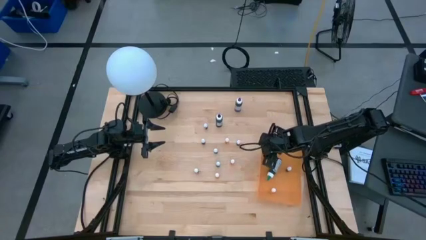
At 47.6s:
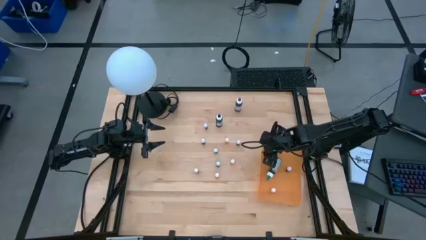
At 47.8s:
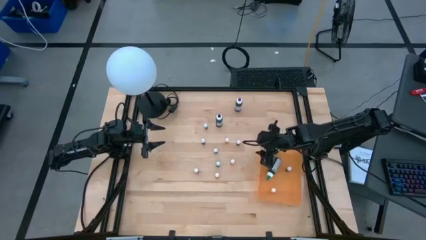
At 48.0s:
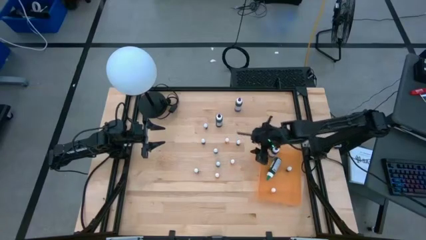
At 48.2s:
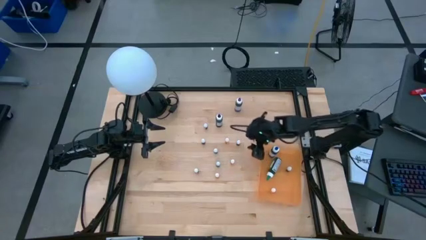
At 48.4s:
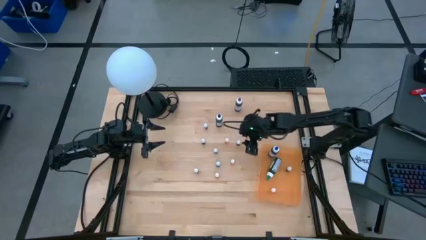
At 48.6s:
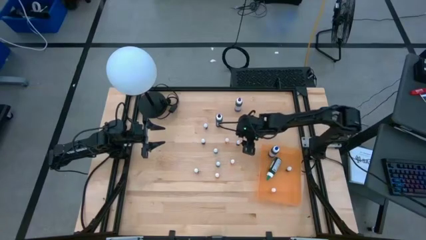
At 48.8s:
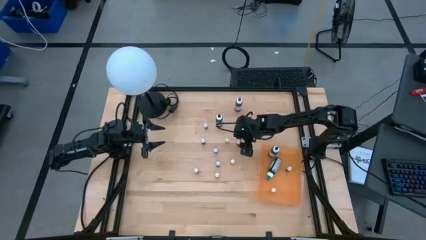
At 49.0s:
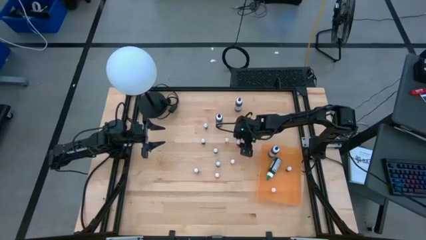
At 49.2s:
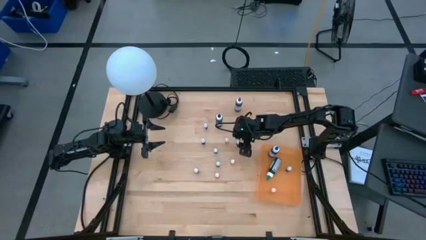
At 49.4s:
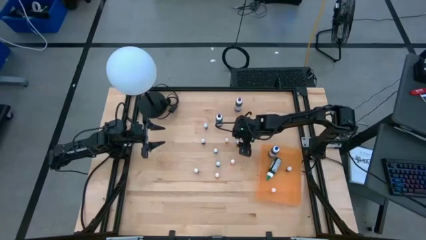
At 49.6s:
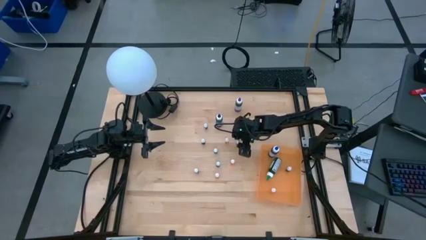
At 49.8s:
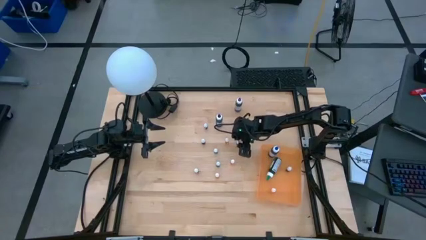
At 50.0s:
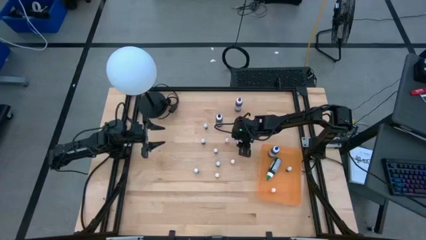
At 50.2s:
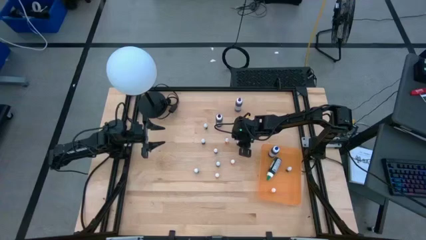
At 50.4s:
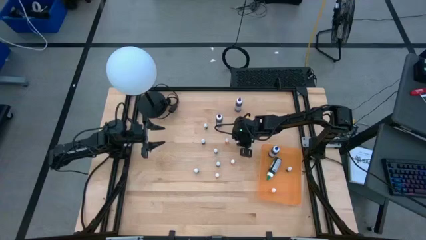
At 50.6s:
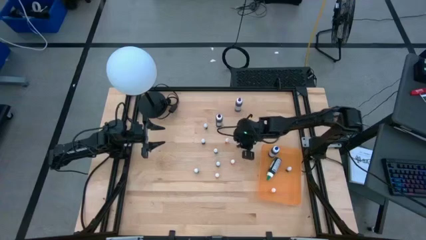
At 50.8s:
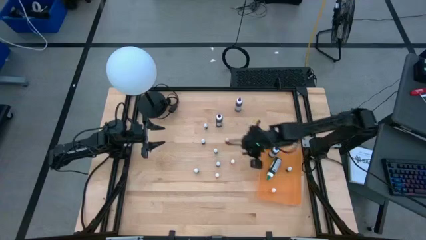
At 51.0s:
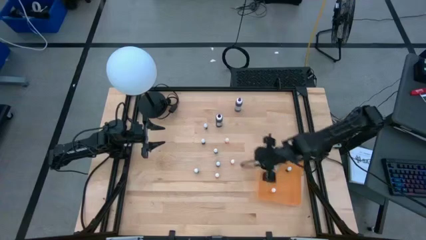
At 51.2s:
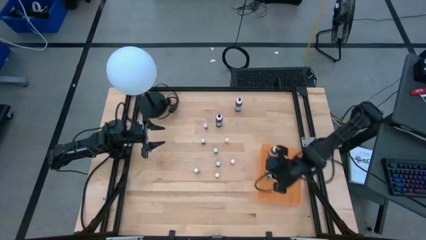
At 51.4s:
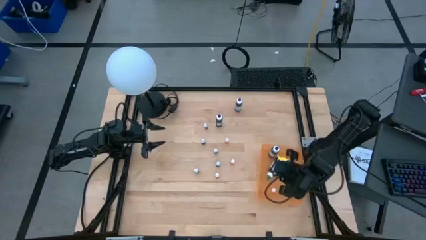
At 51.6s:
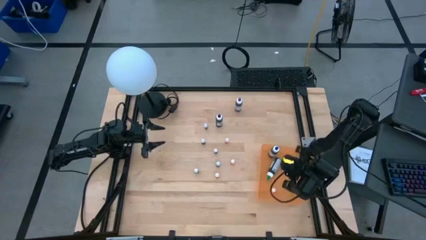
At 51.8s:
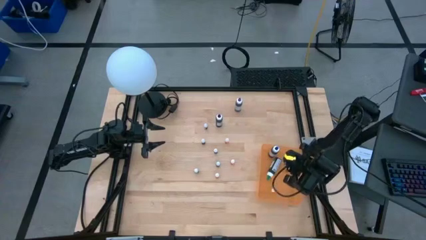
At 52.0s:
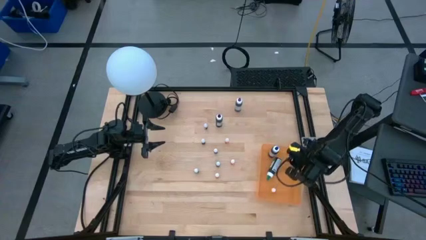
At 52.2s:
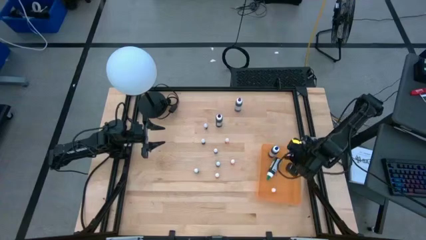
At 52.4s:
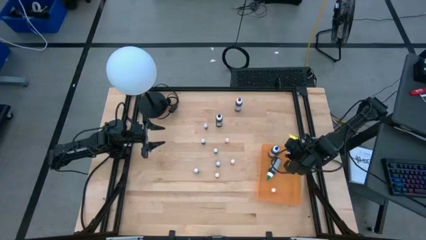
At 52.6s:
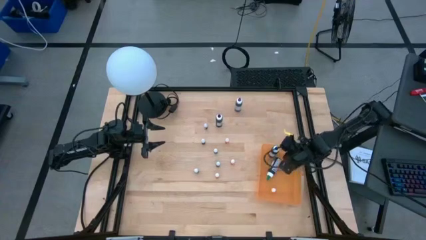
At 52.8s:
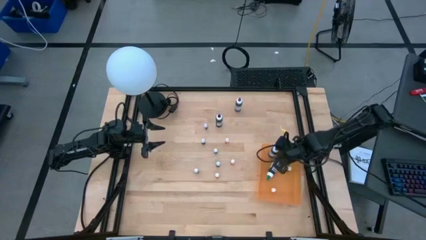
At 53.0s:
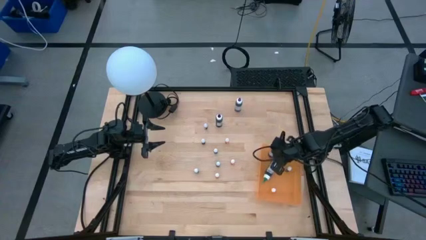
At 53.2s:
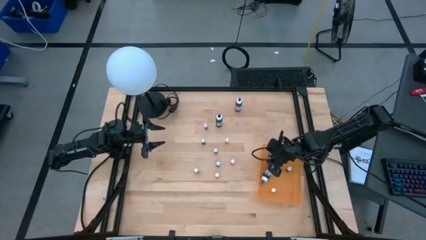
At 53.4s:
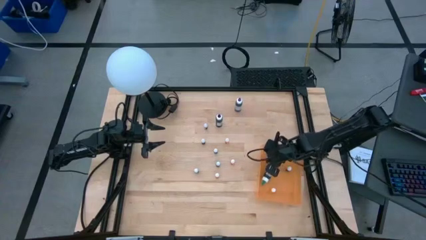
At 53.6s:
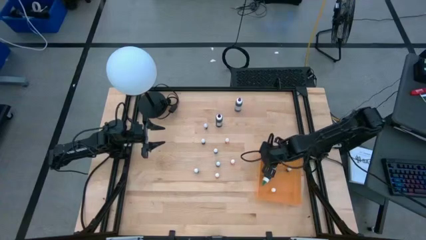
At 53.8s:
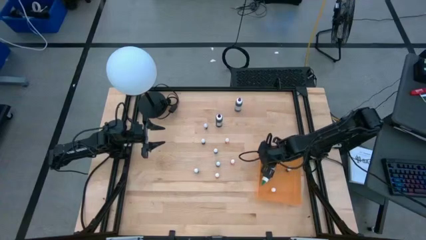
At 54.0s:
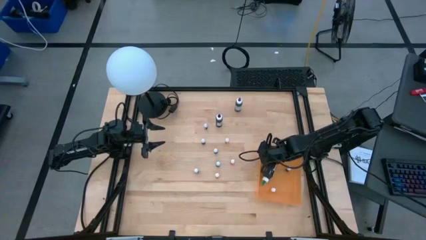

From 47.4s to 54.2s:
Task: Pick & Place food coloring
Put the small red food coloring bottle into the orange bin

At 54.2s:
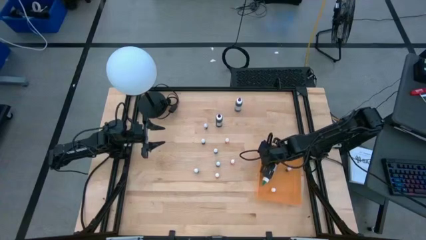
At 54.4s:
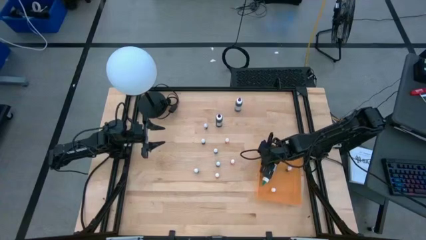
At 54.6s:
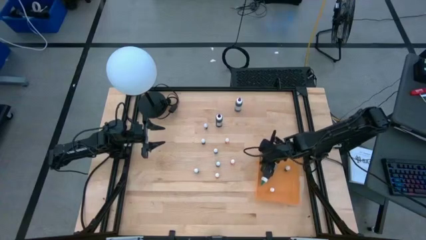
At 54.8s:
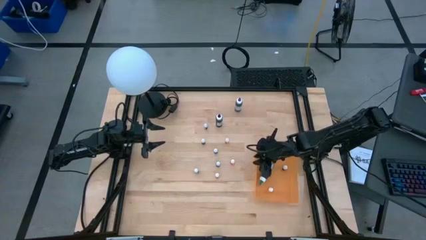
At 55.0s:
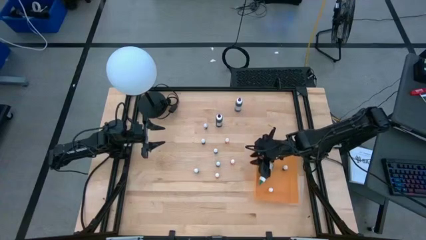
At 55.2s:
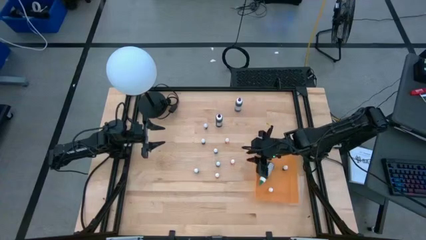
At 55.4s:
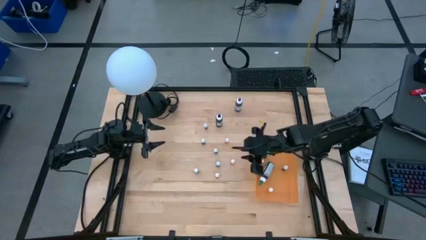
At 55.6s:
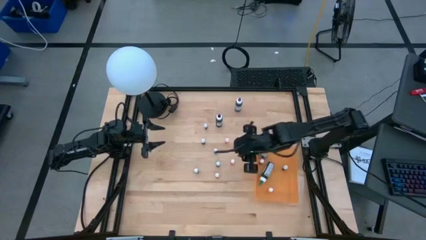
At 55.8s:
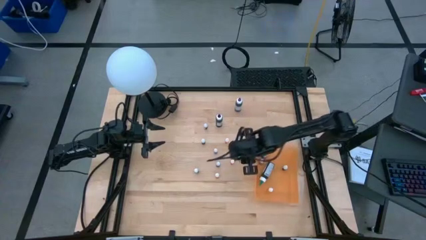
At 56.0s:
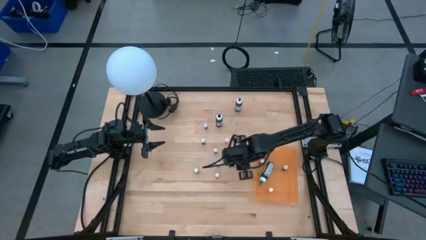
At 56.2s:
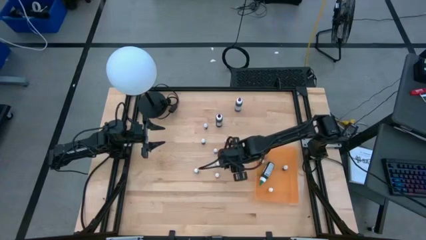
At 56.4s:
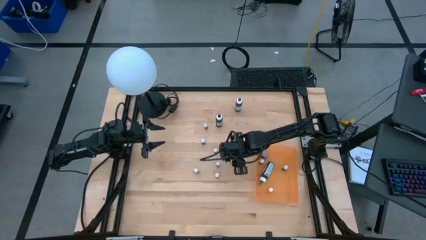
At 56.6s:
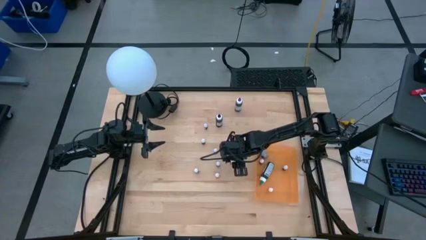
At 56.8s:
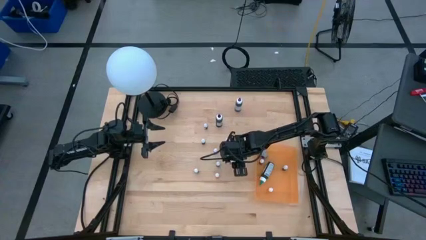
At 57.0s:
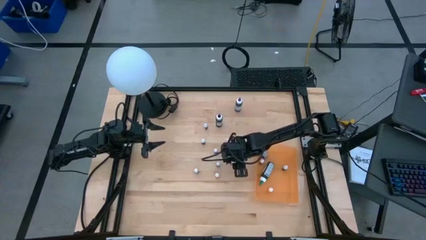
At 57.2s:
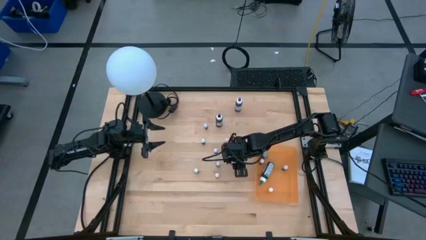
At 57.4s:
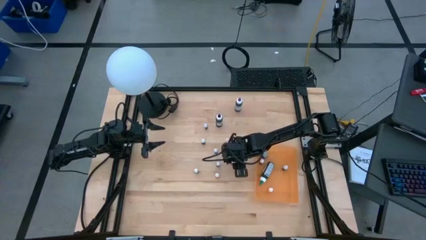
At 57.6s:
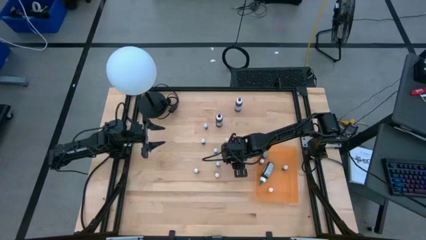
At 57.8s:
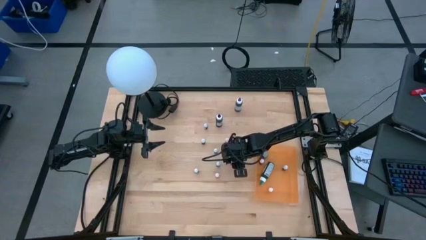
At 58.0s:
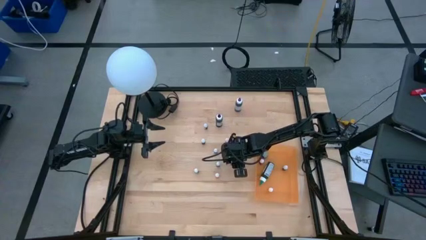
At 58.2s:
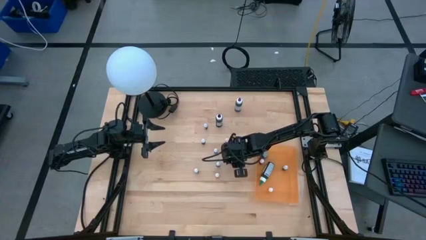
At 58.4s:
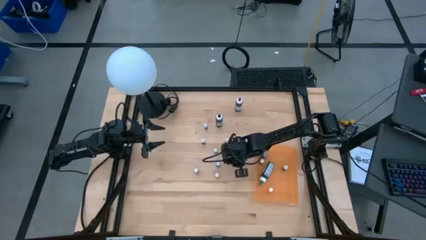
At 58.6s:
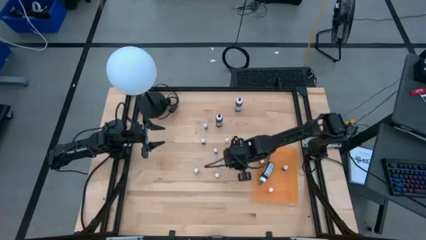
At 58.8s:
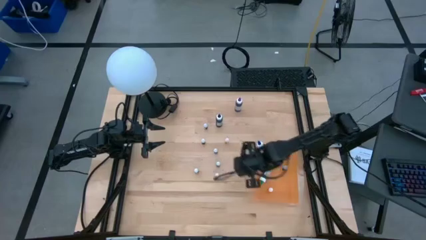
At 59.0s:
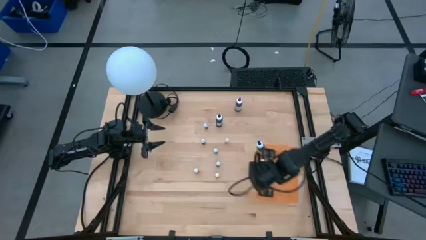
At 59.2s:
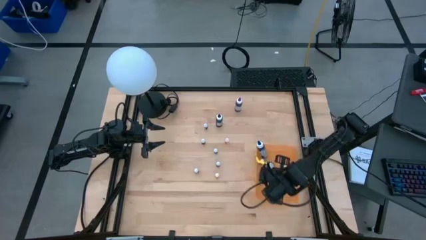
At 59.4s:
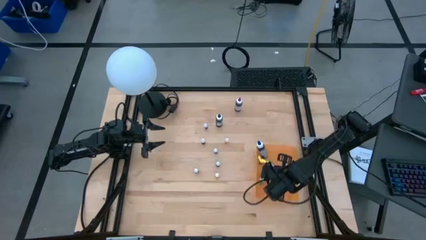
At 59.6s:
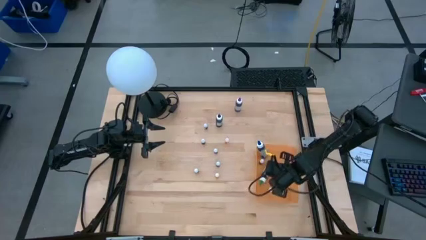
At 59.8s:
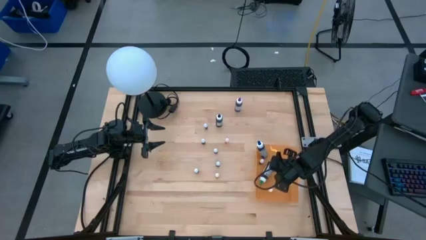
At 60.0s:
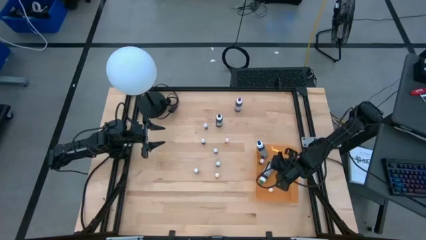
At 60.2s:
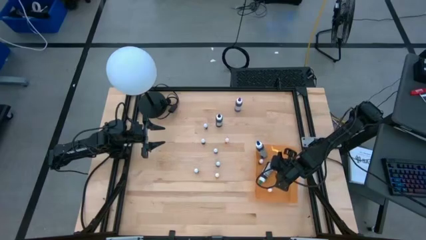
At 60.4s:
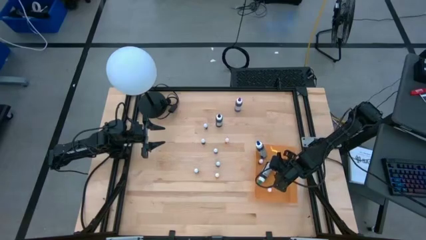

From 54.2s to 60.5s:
Put the middle small yellow food coloring bottle into the orange bin

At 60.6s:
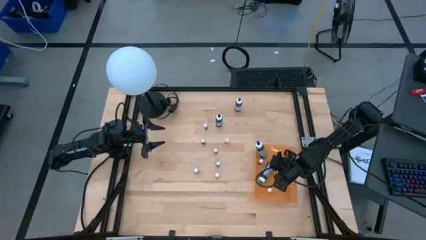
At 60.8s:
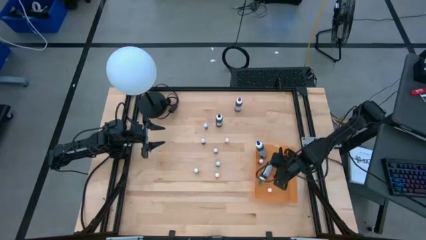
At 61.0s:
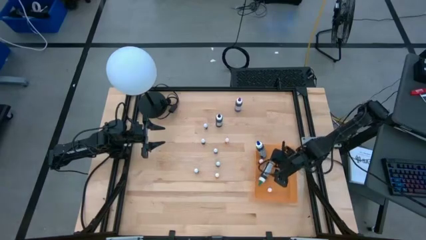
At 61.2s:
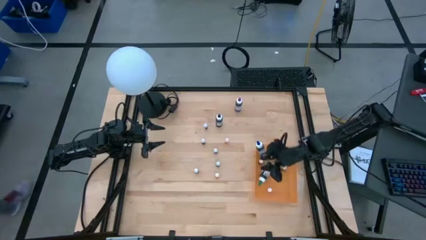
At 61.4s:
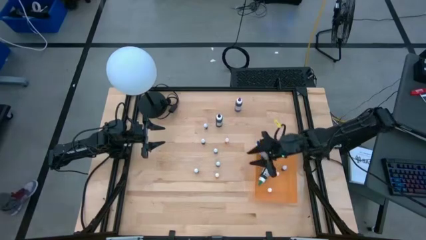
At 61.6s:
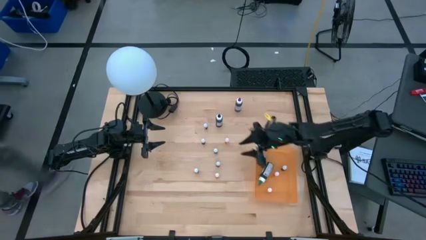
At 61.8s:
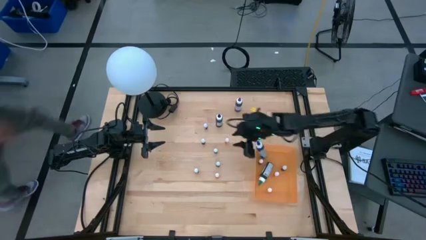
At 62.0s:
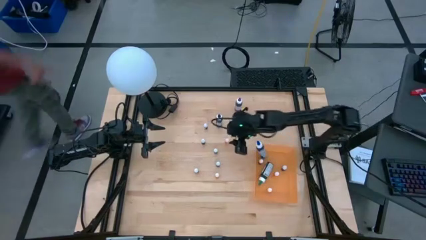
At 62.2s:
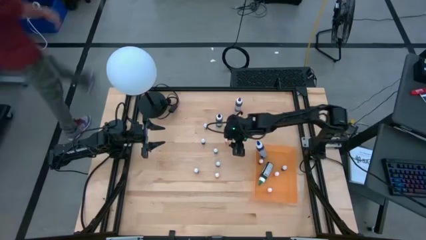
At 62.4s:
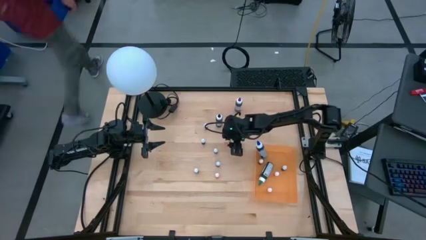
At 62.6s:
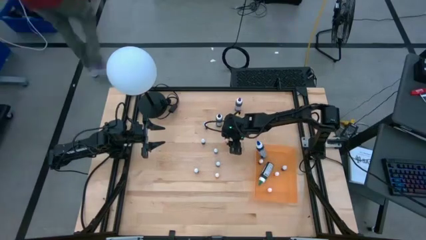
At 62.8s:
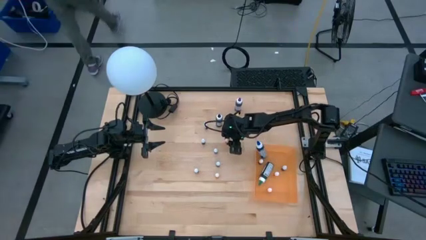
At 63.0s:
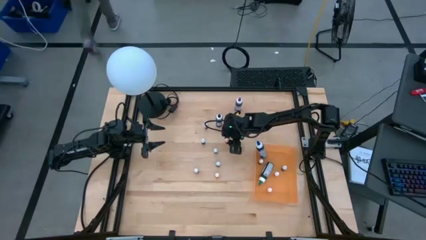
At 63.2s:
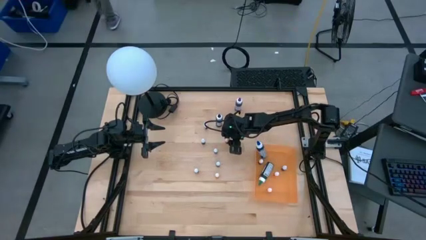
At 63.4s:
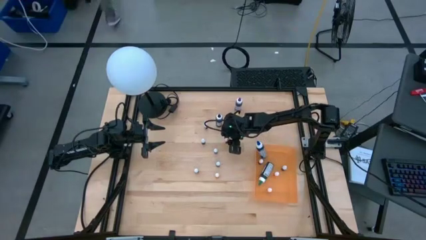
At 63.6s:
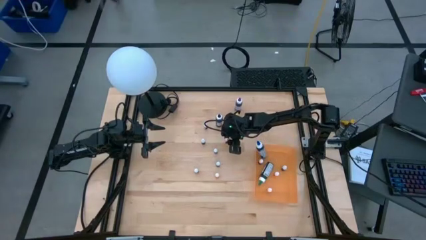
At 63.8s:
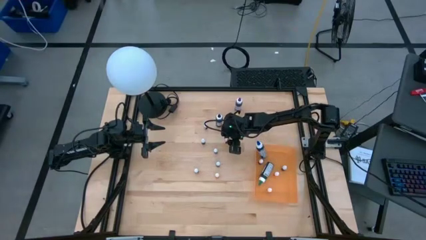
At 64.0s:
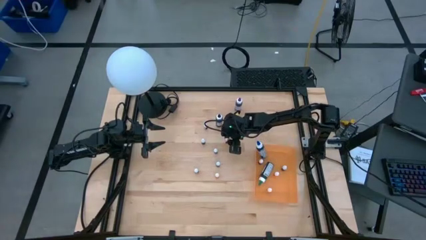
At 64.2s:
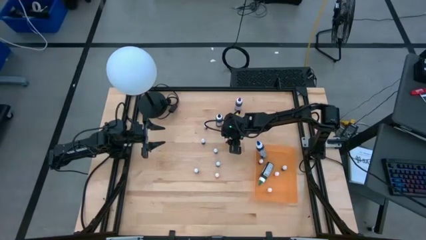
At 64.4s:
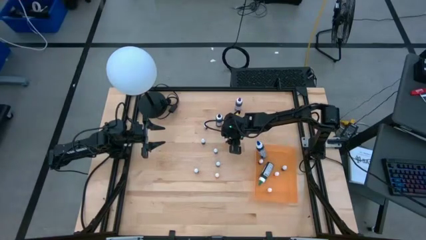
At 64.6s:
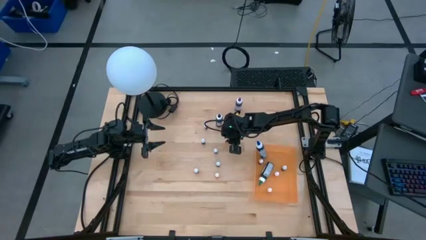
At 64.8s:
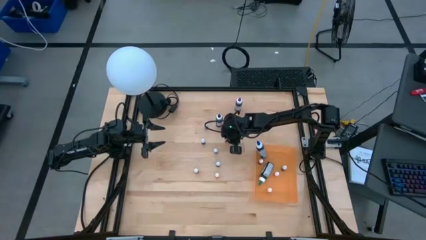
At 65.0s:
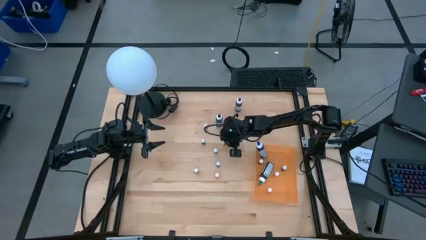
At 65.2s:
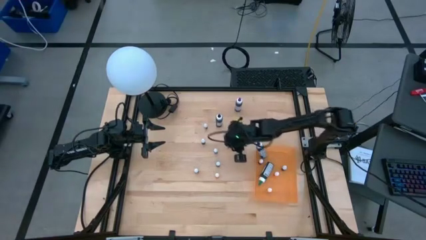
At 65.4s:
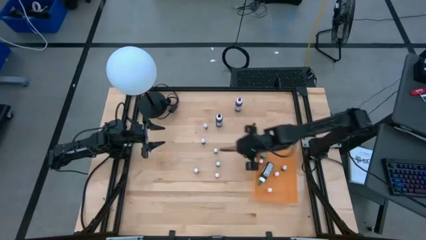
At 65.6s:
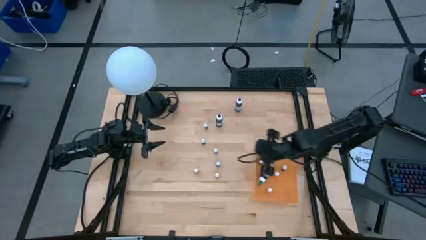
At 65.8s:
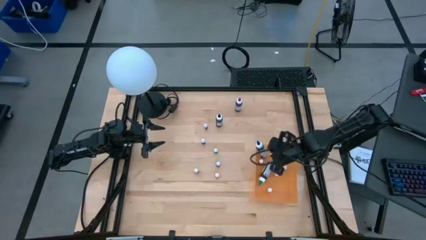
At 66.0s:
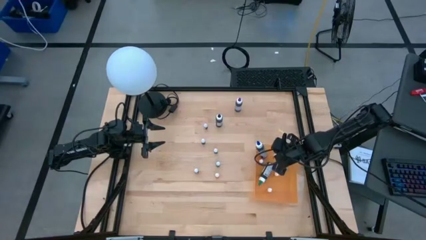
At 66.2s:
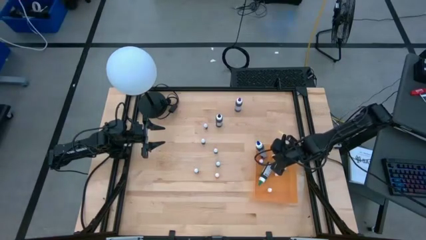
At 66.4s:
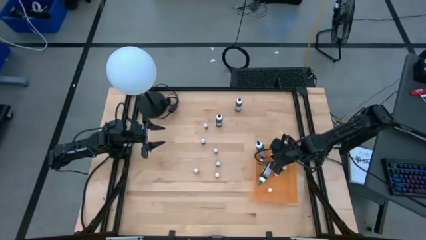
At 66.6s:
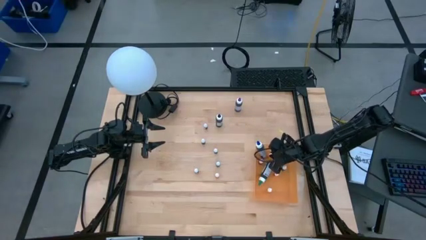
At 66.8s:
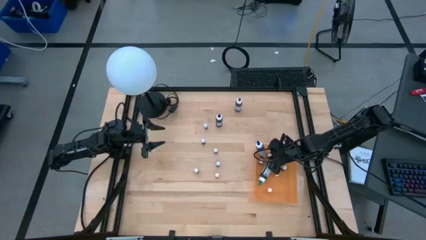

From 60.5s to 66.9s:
Put the top small yellow food coloring bottle into the orange bin
